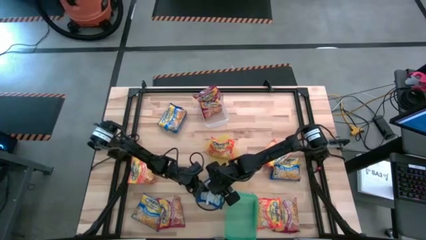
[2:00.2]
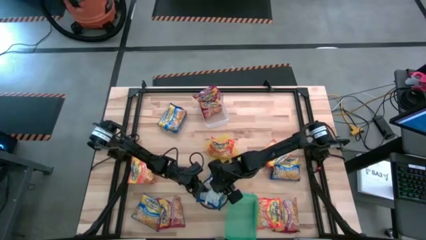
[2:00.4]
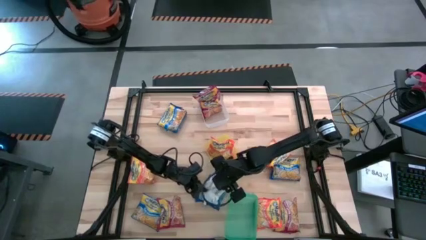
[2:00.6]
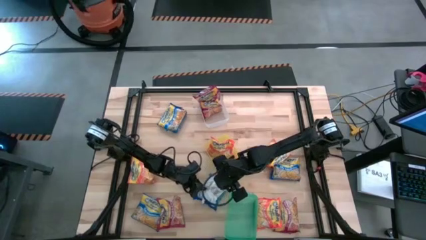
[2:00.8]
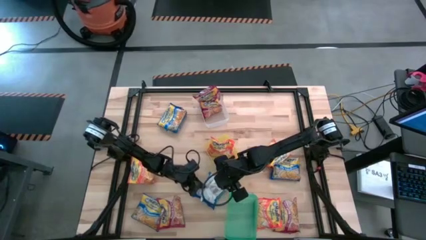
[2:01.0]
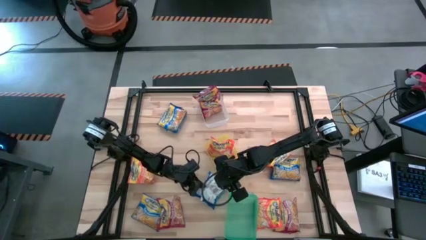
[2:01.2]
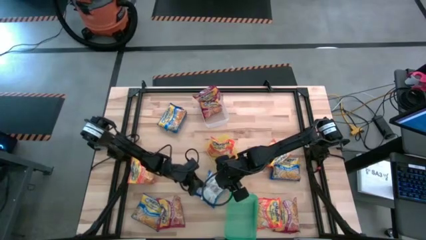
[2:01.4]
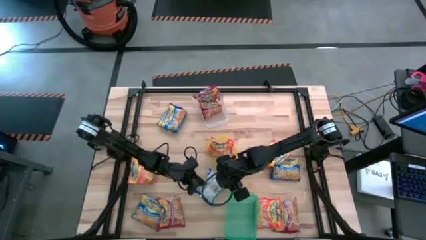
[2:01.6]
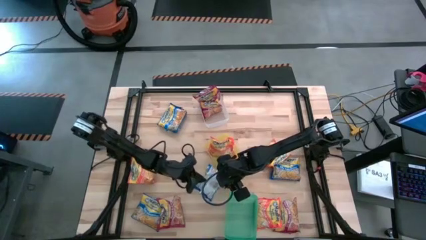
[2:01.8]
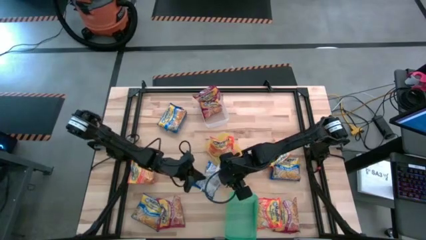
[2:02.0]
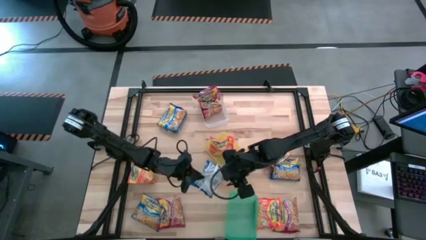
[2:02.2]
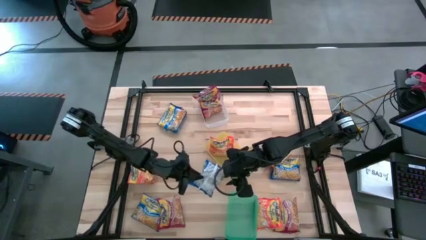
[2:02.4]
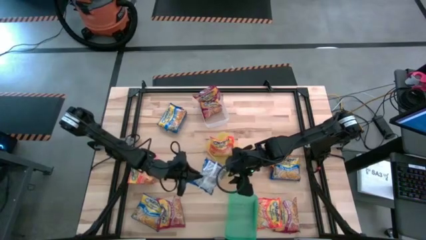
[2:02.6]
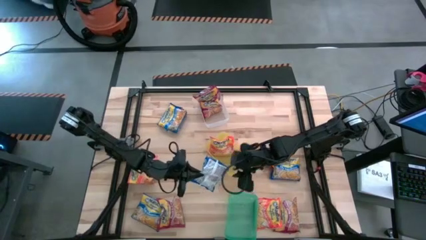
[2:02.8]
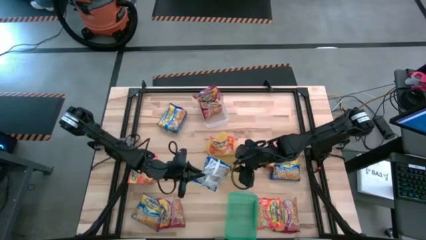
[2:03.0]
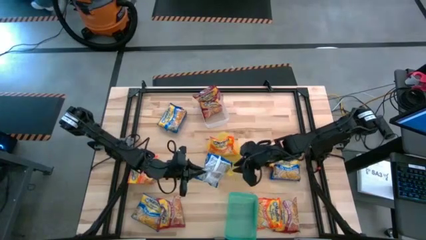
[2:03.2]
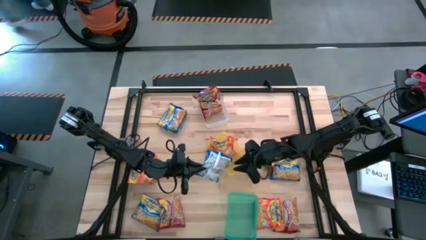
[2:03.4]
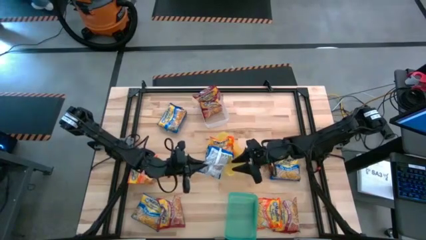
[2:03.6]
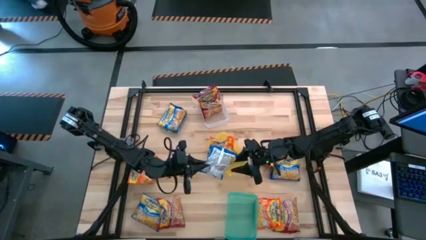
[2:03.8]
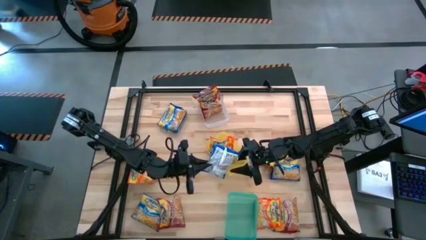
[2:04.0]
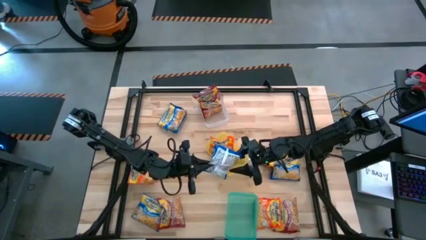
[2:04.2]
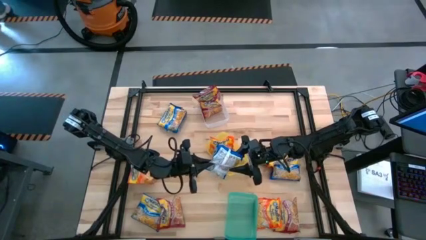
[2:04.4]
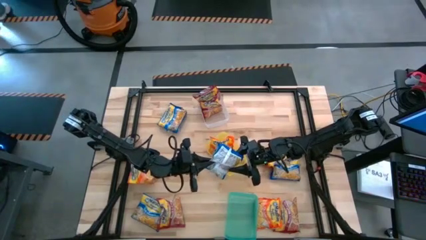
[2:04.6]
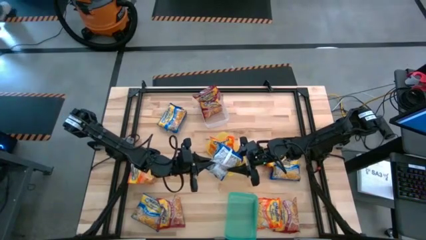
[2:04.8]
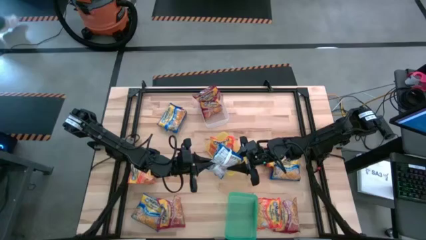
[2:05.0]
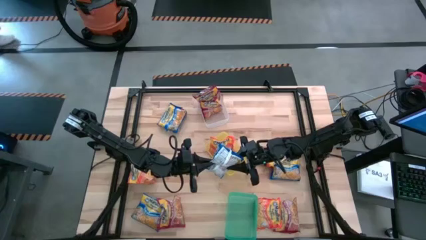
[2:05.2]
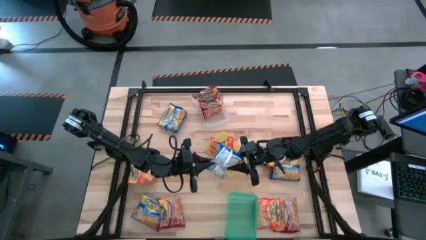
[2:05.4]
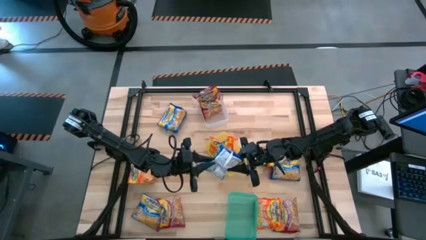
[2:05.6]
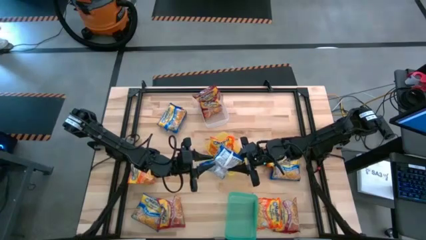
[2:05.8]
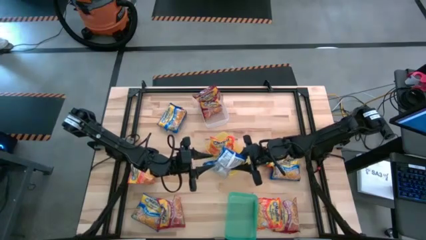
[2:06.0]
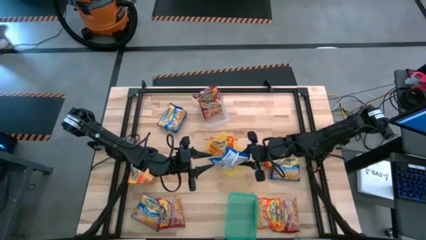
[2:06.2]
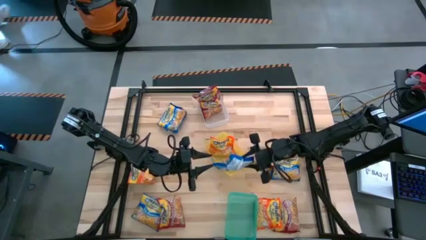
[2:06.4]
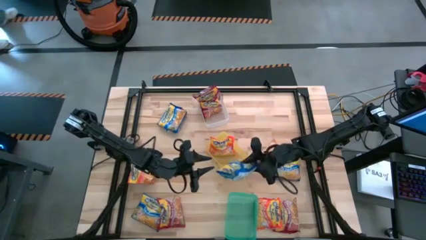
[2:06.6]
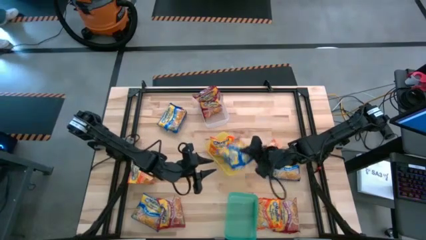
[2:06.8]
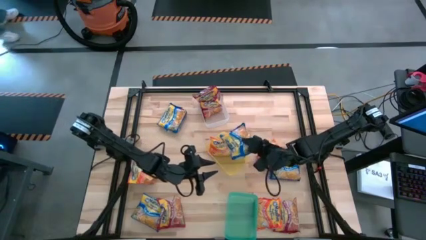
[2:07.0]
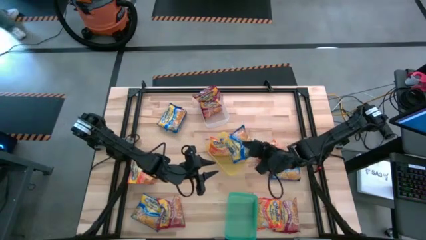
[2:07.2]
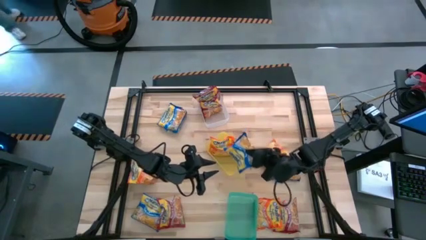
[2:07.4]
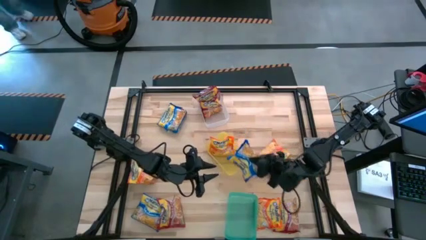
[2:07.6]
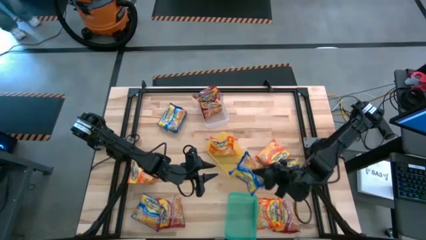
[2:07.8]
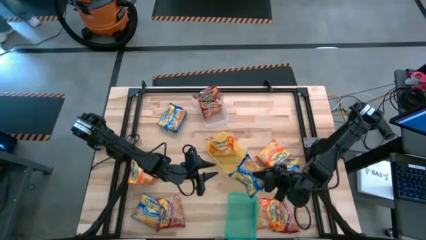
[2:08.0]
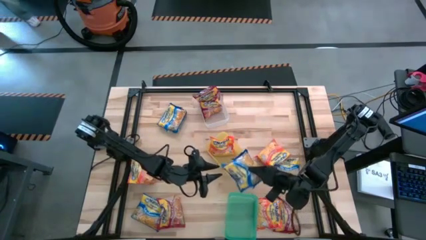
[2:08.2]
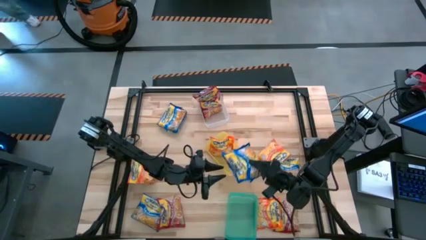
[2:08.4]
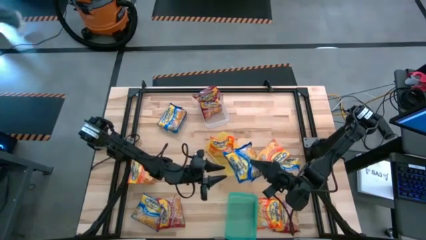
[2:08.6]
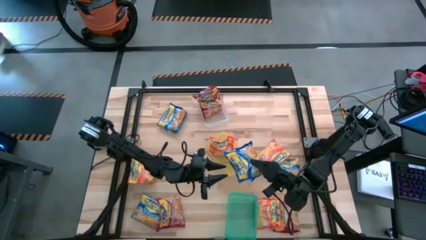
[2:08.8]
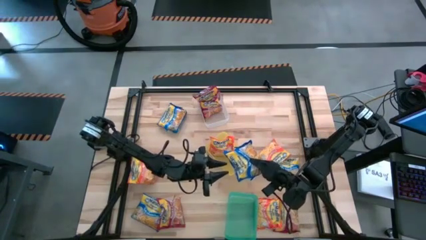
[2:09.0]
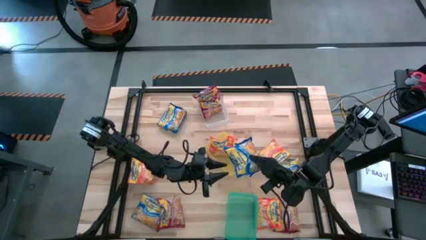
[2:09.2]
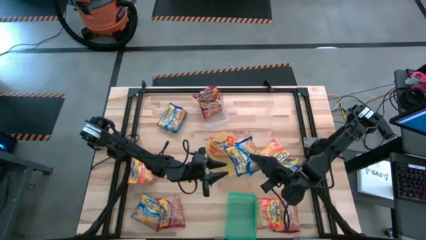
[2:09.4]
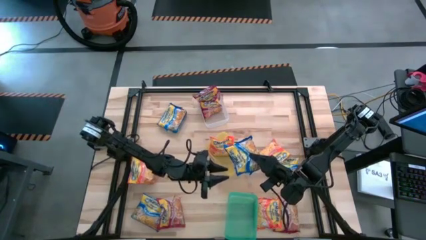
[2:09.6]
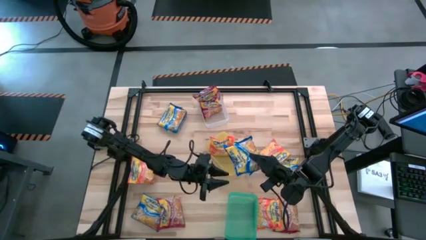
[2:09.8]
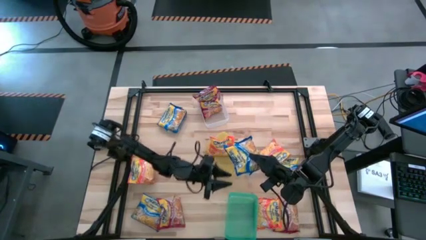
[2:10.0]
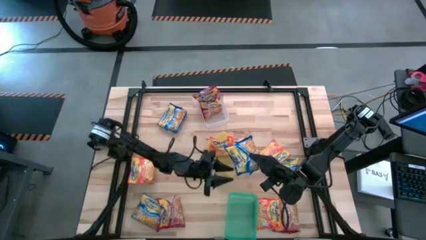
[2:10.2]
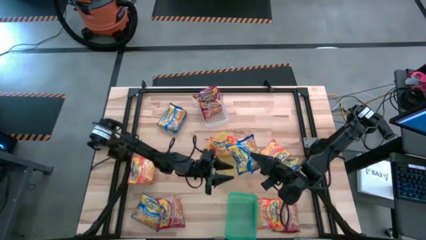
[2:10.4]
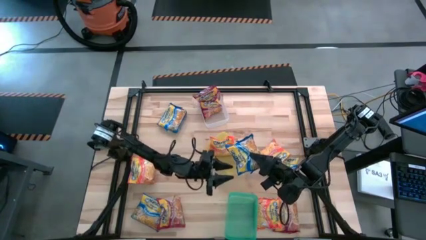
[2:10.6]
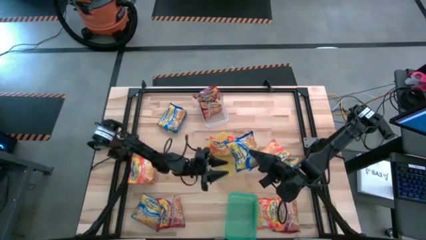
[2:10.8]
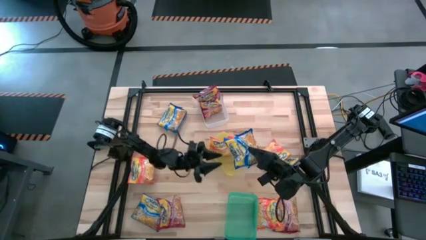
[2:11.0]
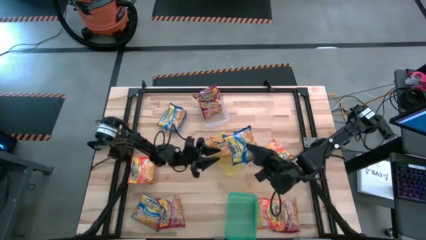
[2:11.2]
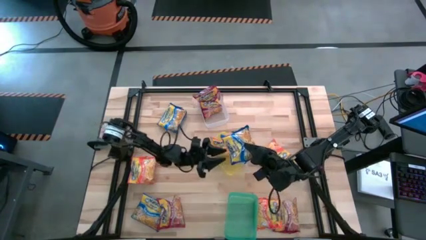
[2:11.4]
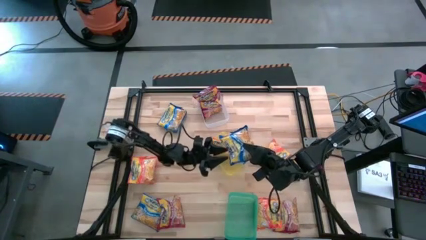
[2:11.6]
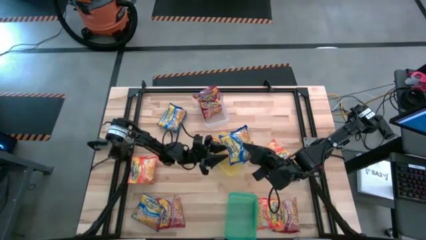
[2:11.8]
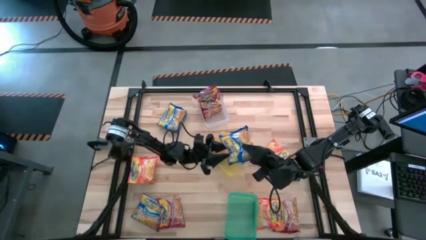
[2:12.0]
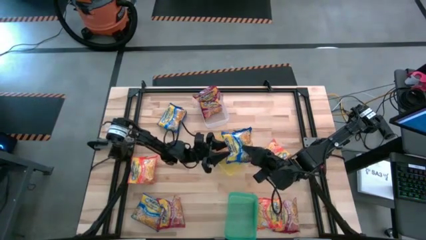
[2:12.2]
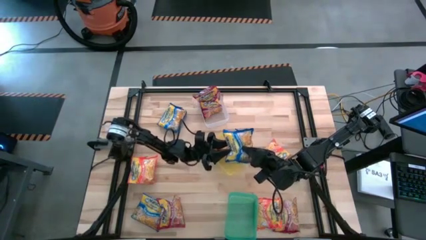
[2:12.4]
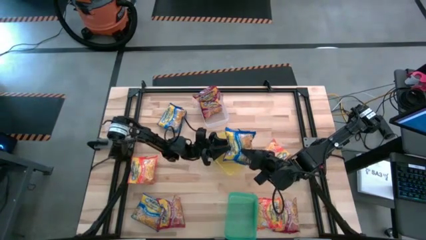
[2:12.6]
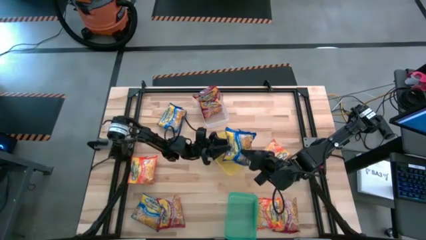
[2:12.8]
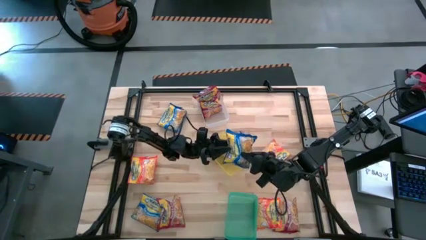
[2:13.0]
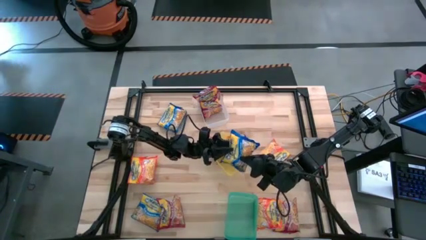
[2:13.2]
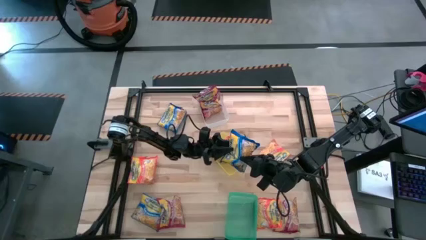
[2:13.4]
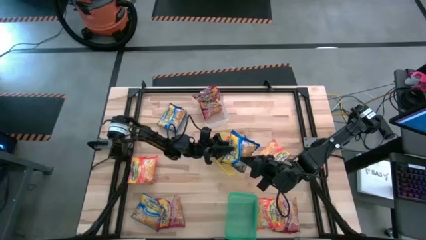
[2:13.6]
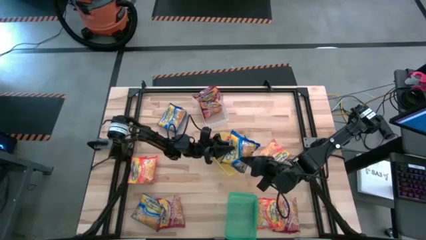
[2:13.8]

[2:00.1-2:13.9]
Task: Sort Maruchan noodles
Put the blue noodle pack into the green bin
